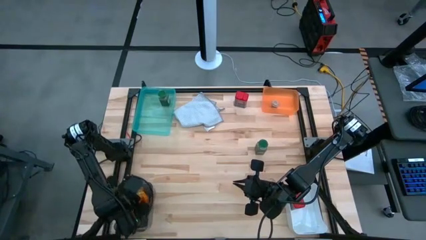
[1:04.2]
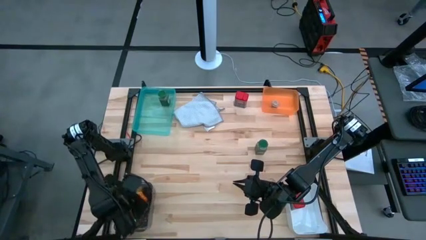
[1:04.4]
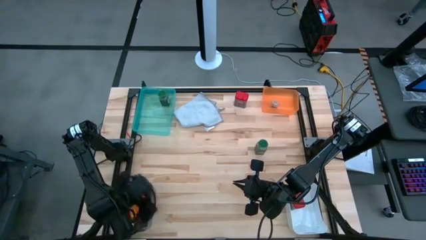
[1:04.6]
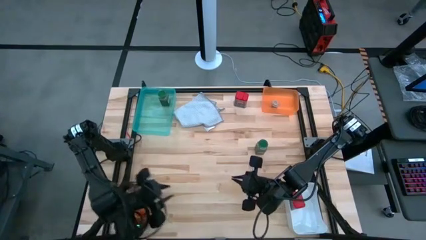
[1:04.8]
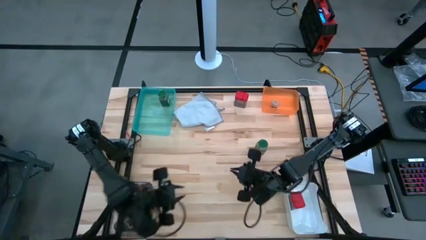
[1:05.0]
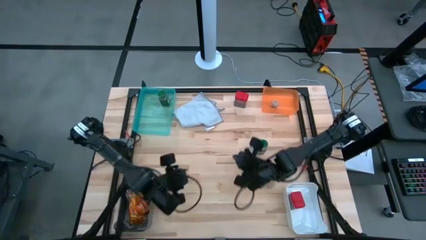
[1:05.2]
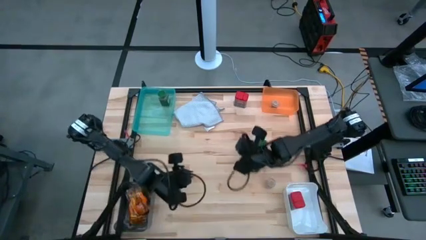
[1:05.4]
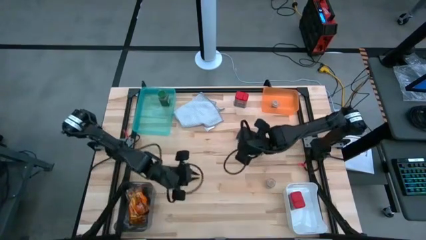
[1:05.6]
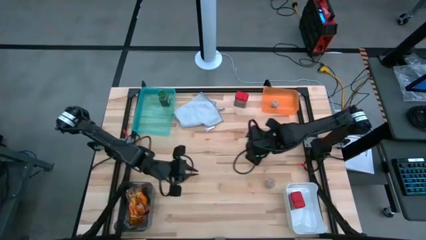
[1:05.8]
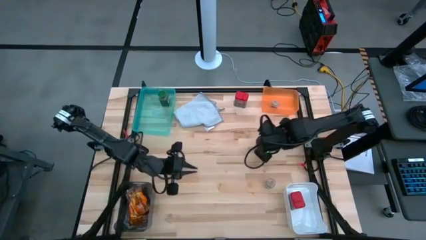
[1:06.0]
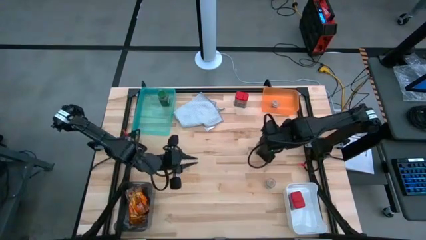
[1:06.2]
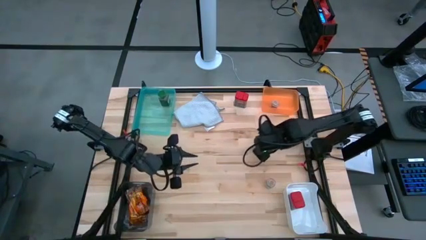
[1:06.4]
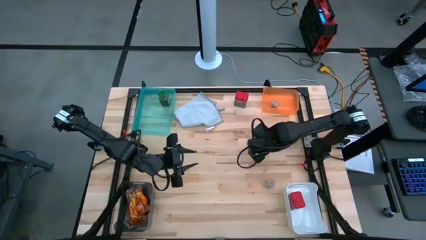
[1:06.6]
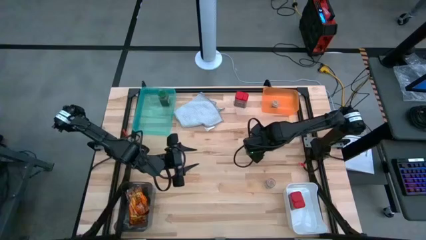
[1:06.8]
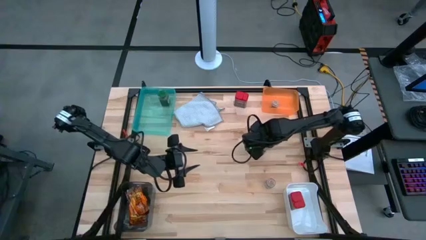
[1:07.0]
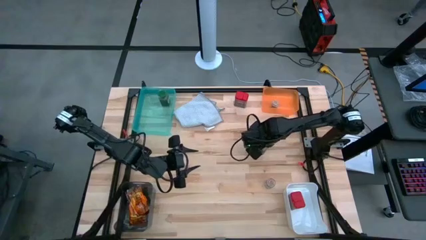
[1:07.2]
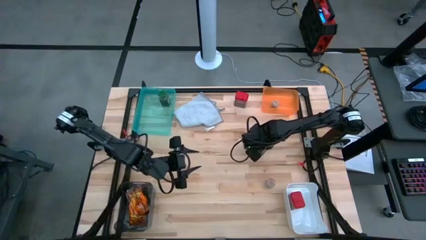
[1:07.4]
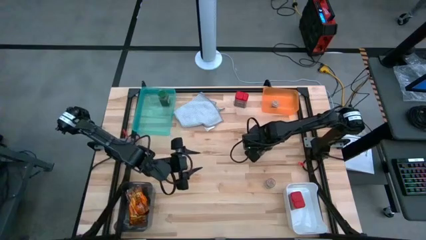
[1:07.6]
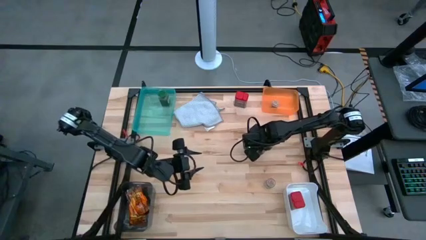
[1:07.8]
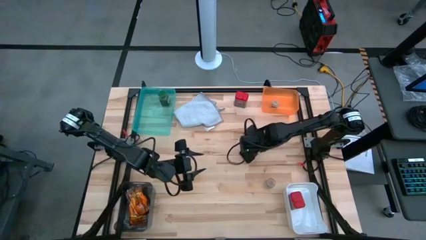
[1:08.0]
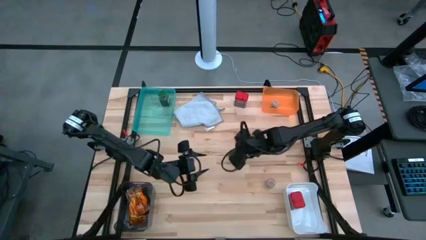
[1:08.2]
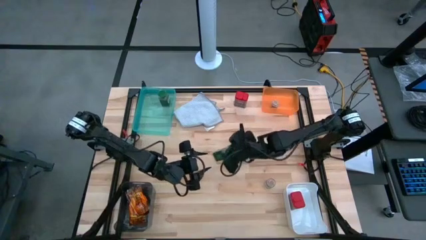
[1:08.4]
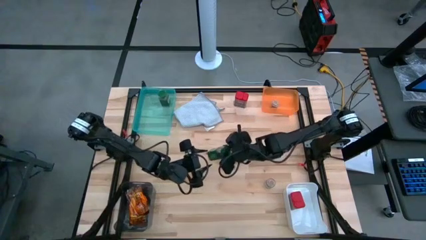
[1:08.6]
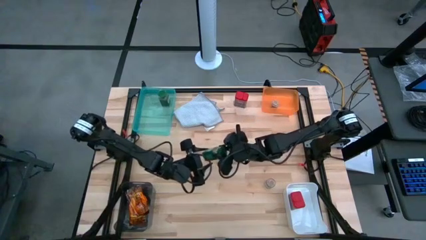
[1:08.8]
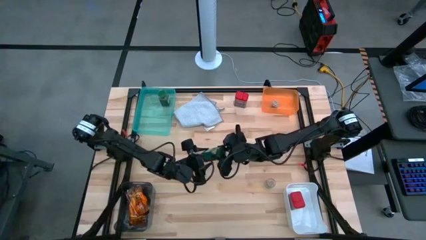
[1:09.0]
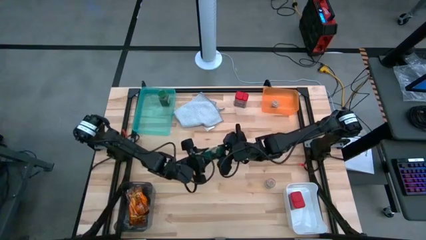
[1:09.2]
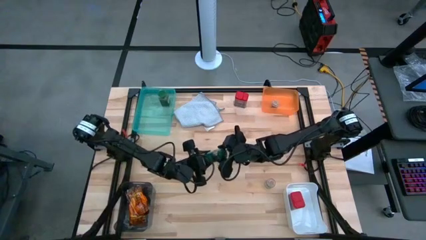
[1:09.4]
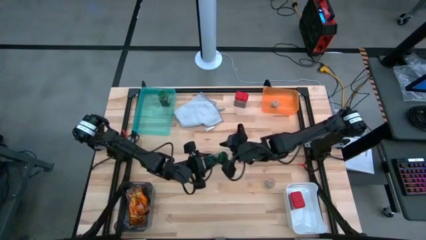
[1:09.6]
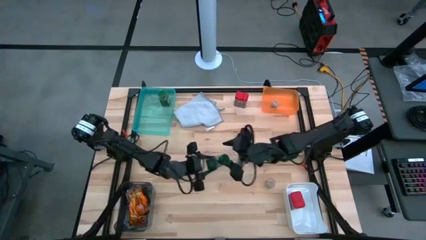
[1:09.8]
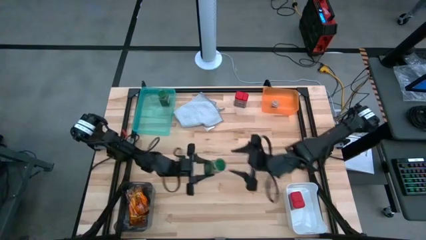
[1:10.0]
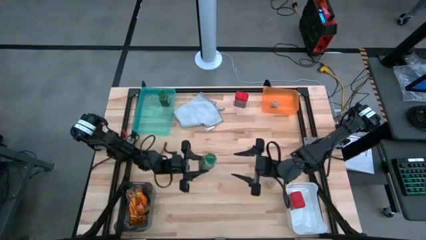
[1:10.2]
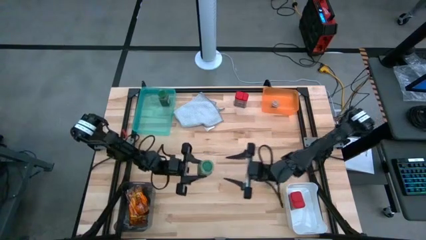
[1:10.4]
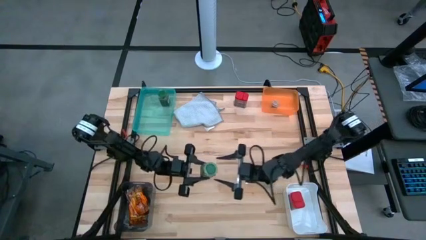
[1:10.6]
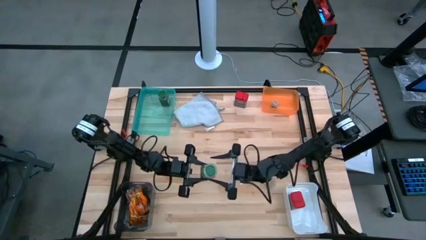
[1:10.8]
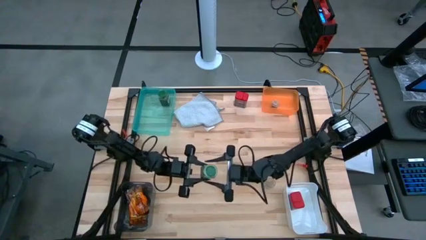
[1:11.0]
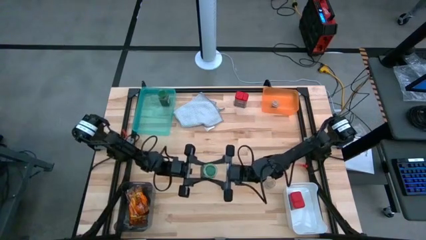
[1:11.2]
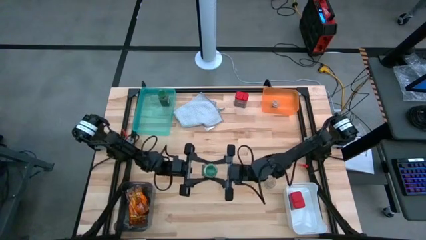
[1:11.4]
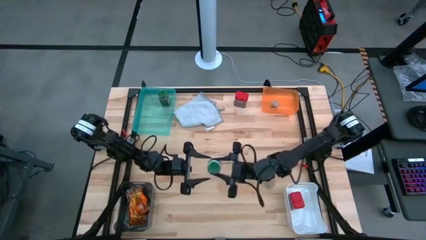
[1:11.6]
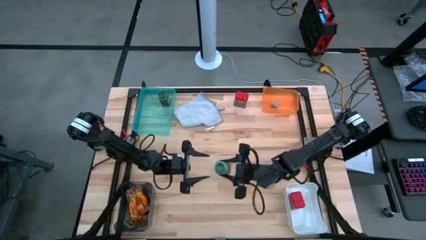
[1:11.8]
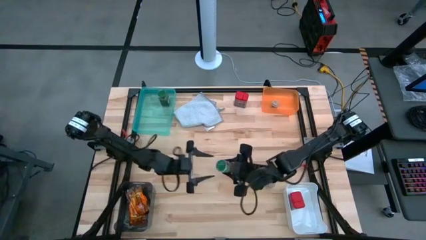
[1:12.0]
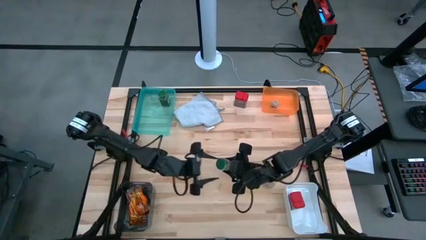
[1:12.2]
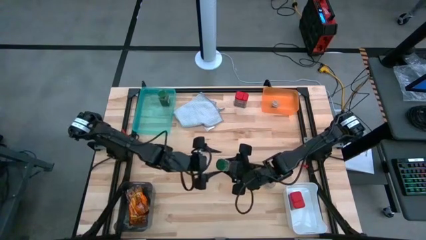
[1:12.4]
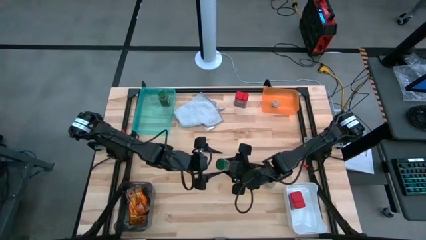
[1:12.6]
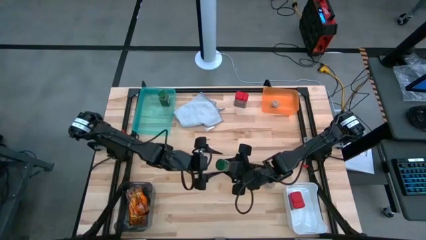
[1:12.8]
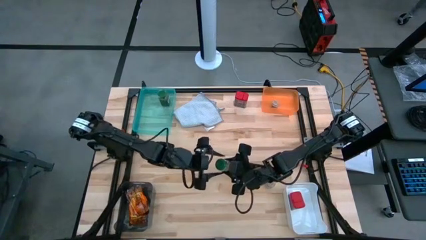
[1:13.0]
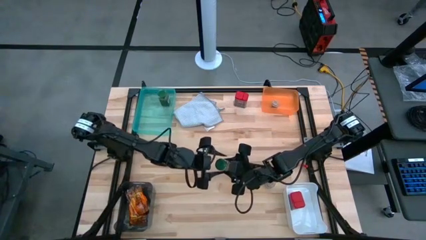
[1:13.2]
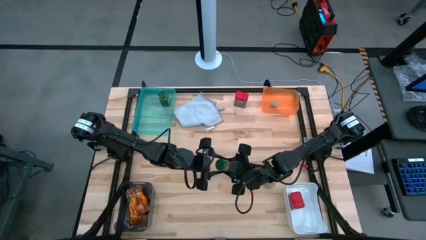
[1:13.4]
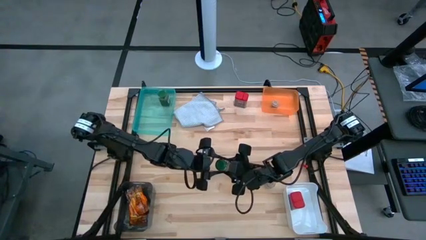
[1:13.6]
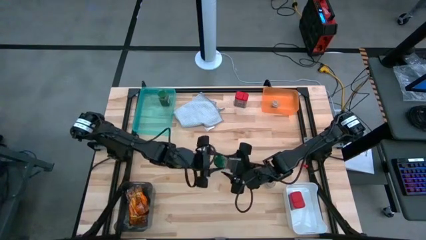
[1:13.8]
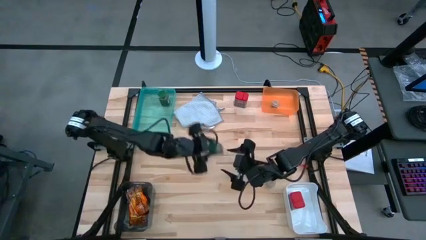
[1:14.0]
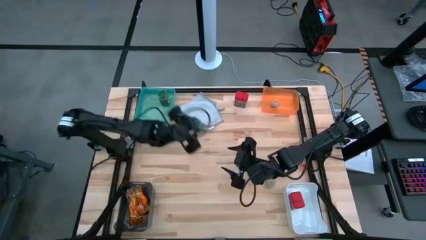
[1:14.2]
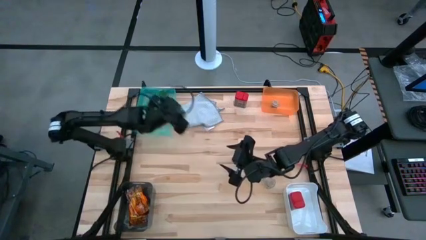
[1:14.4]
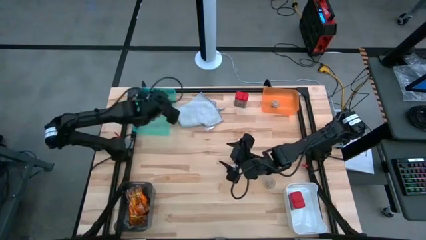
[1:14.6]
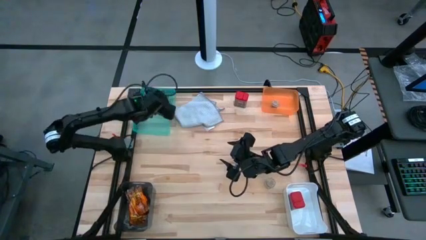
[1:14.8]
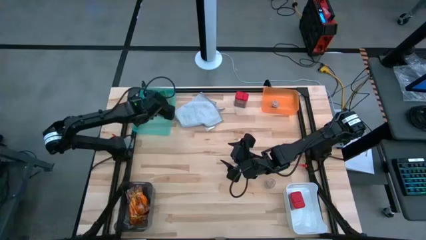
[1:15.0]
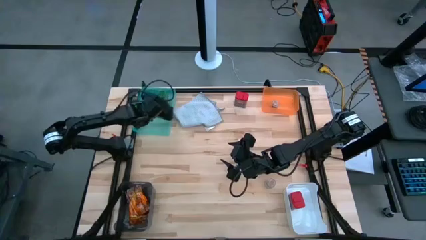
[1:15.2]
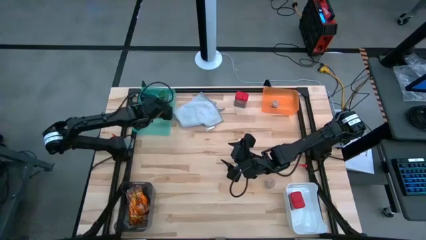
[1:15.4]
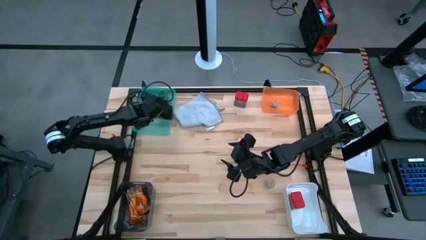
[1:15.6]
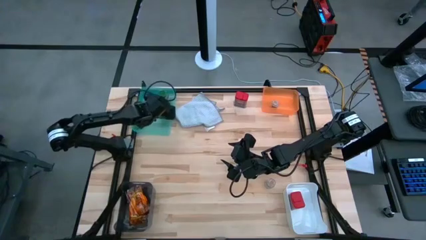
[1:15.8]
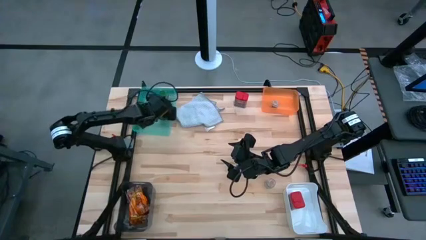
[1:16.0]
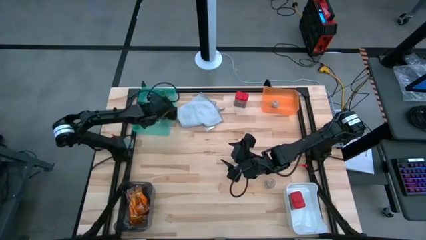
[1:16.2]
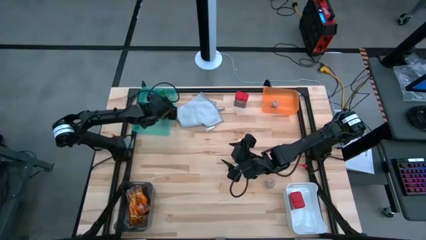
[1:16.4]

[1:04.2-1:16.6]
Task: Sort spices by type
Put the green seasoning bottle into the blue bin
